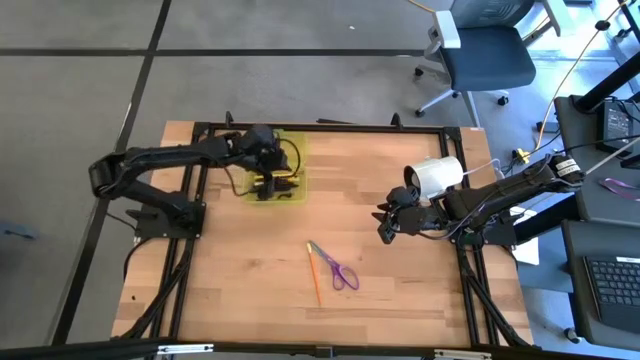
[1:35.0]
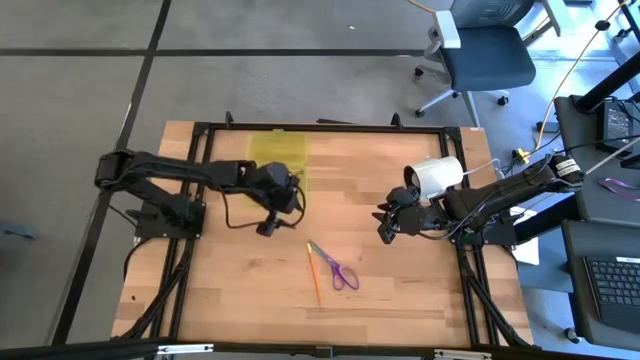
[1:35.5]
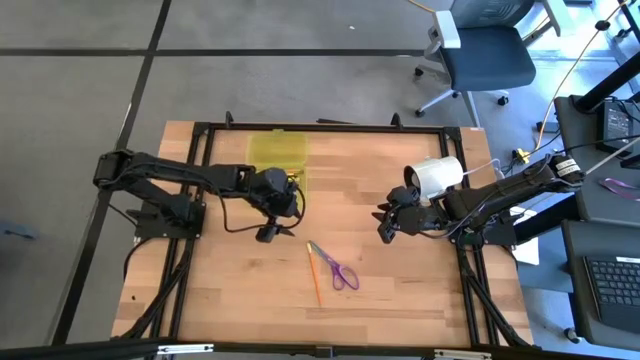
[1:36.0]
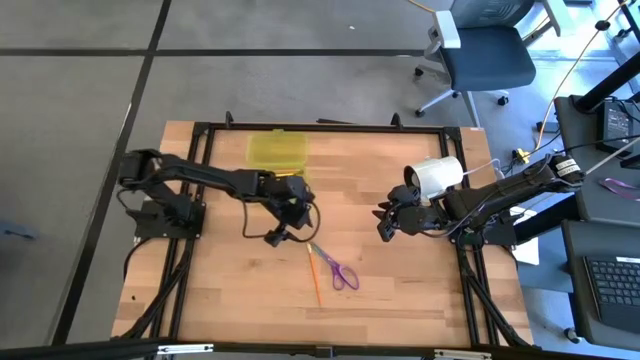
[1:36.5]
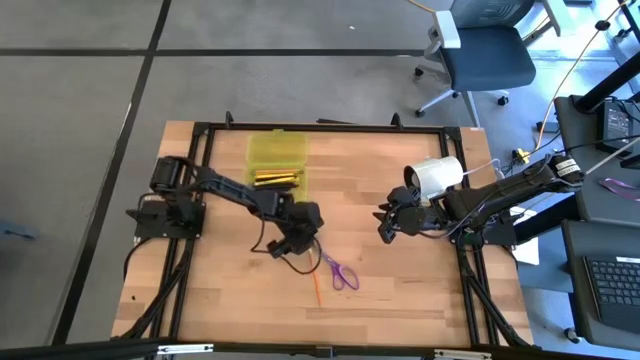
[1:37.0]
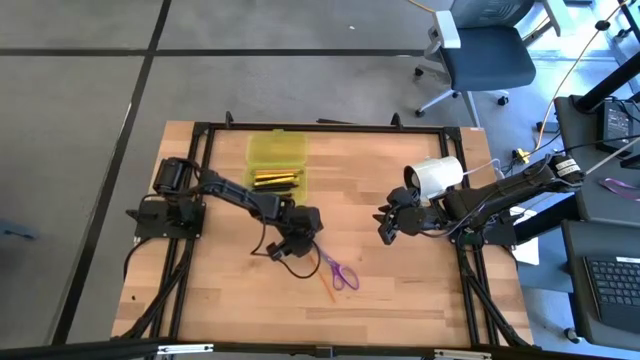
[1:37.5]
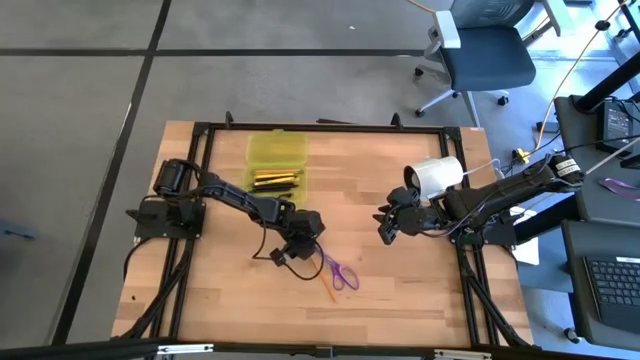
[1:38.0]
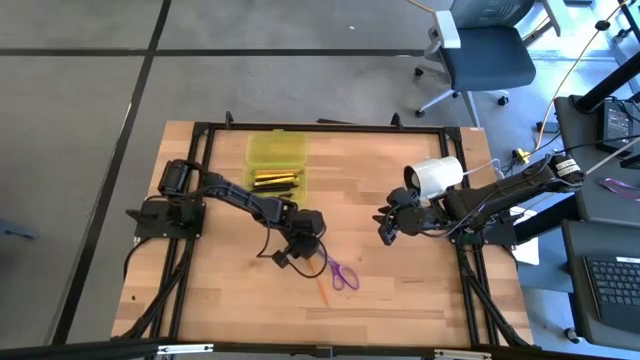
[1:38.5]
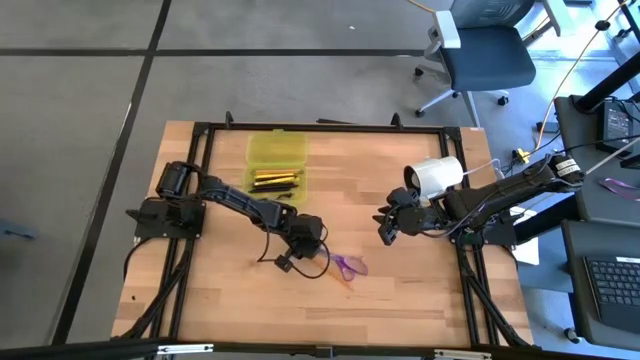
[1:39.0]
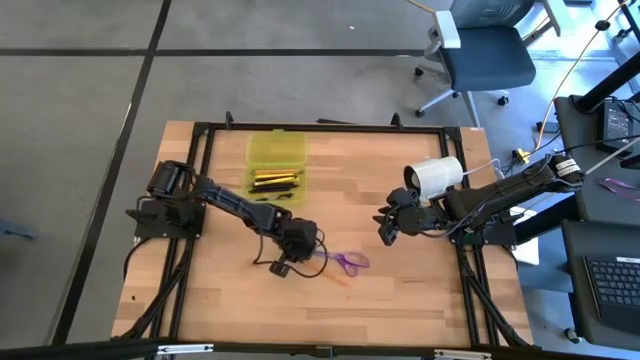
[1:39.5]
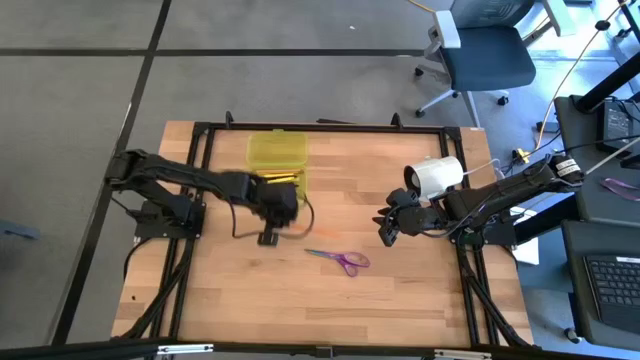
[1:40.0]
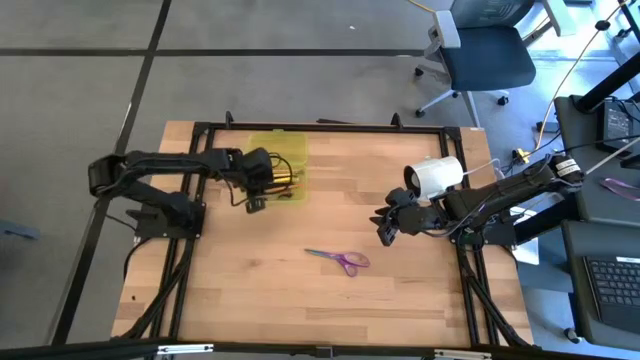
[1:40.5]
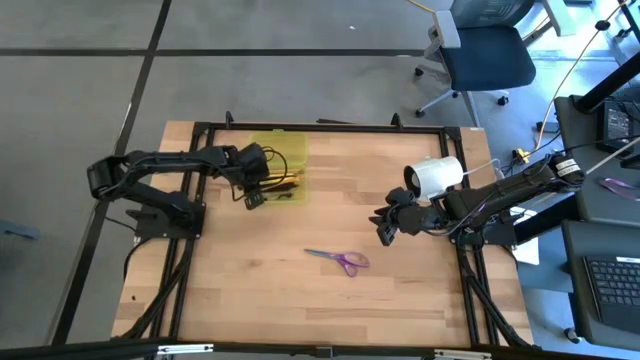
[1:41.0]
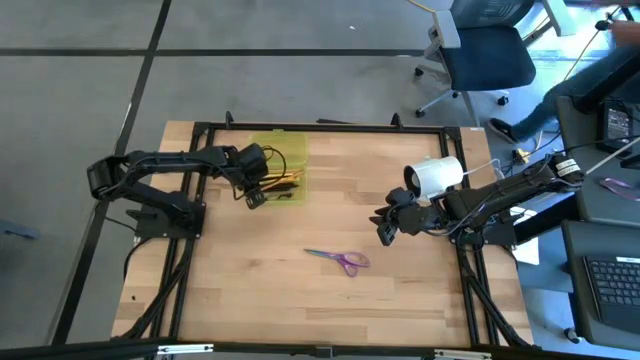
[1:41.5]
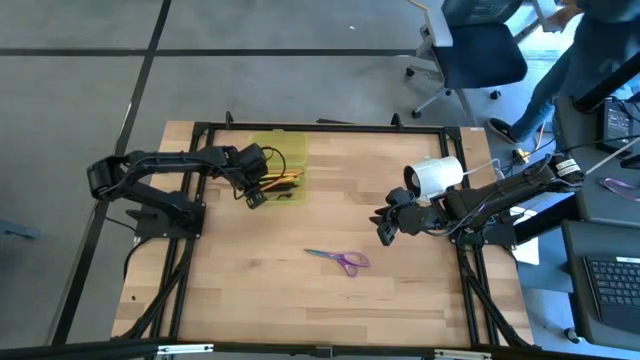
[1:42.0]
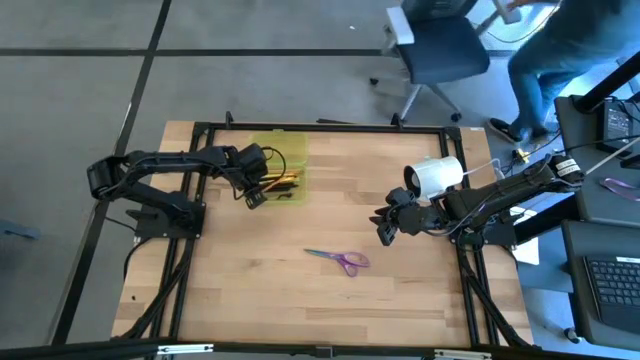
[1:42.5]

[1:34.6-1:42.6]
Task: Pick & place school supplies into a supply box
Put the pencil into the yellow supply box

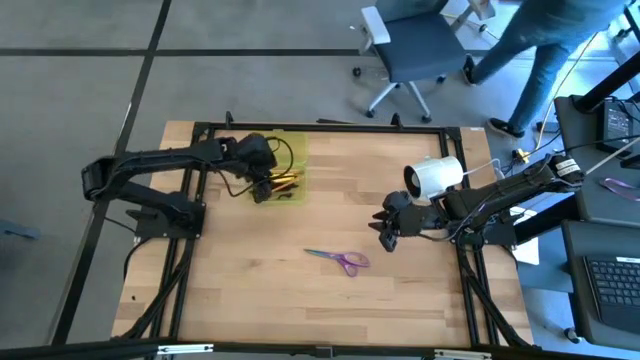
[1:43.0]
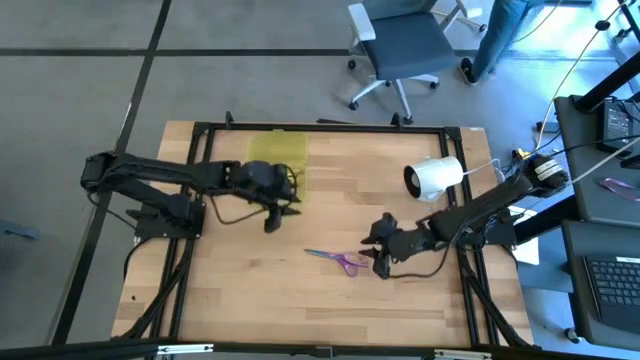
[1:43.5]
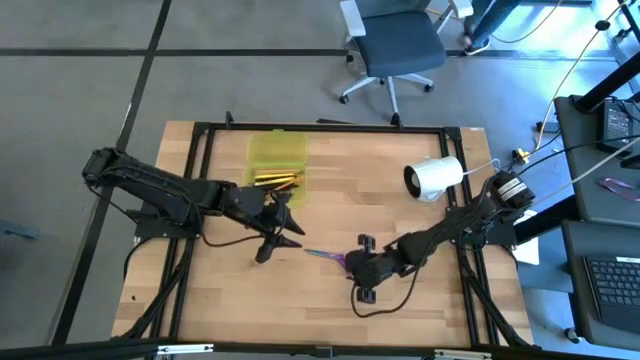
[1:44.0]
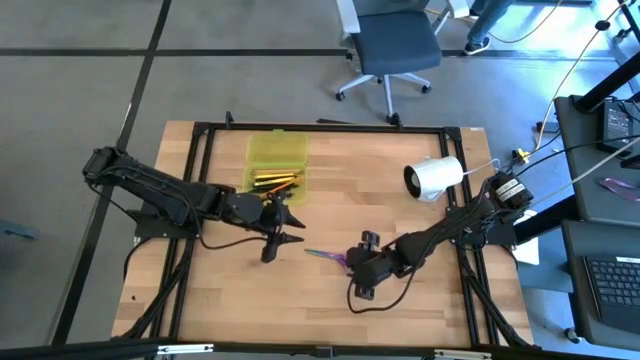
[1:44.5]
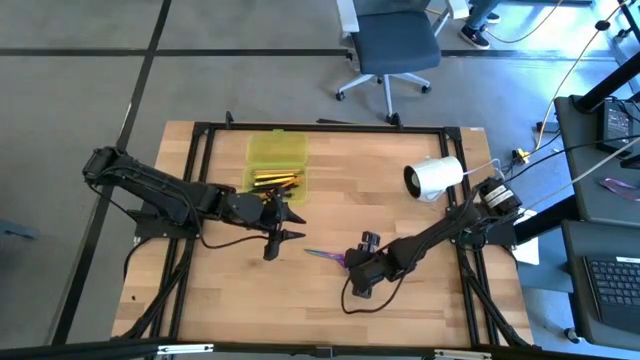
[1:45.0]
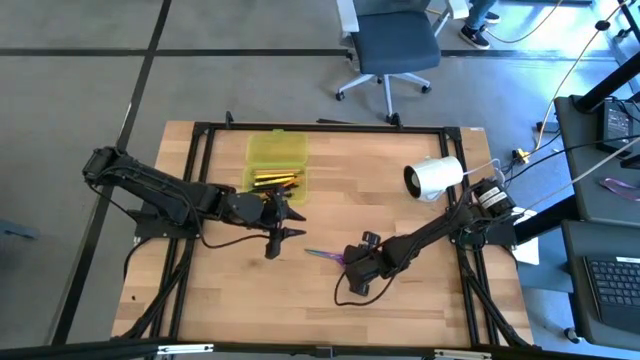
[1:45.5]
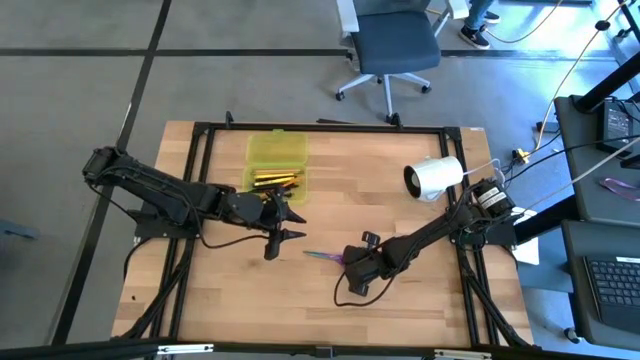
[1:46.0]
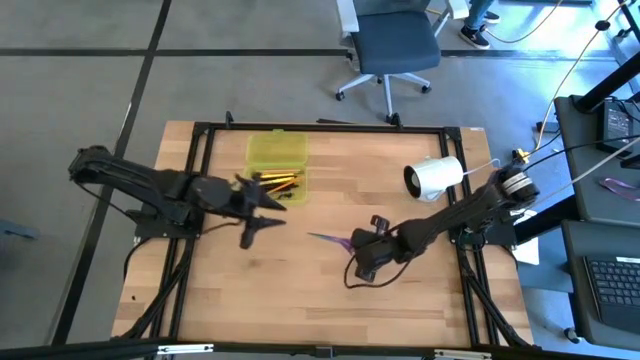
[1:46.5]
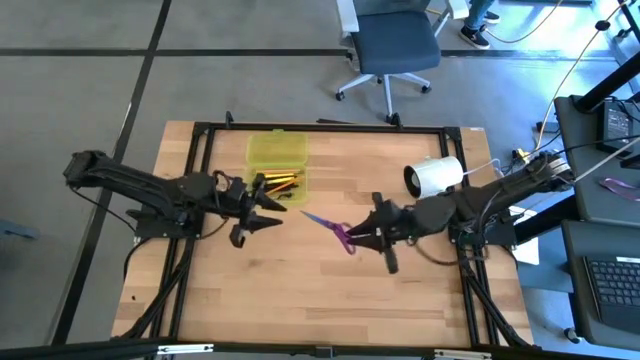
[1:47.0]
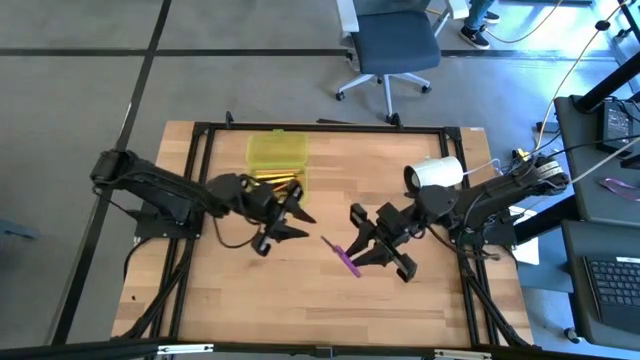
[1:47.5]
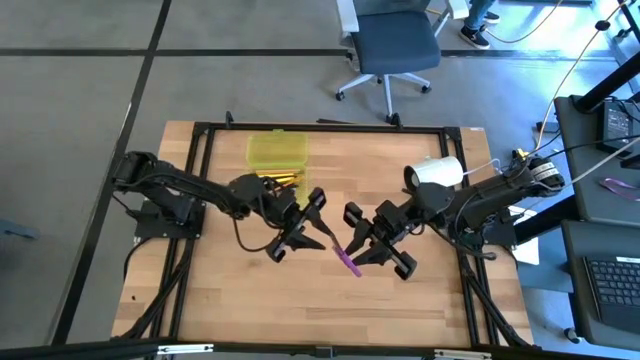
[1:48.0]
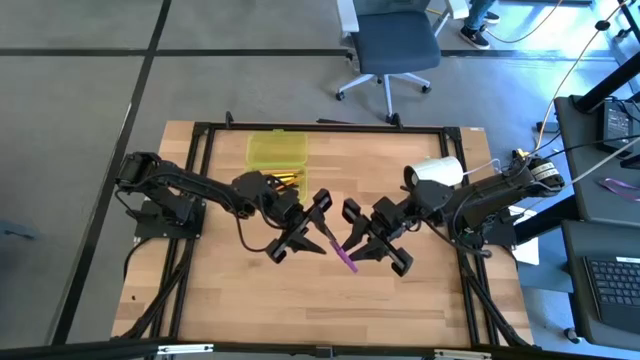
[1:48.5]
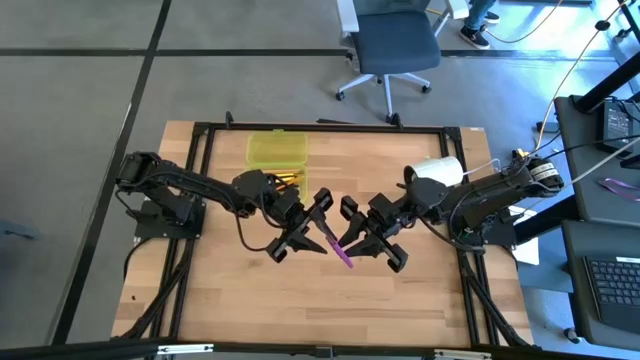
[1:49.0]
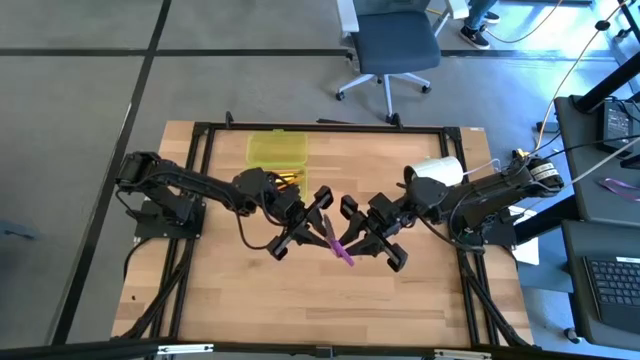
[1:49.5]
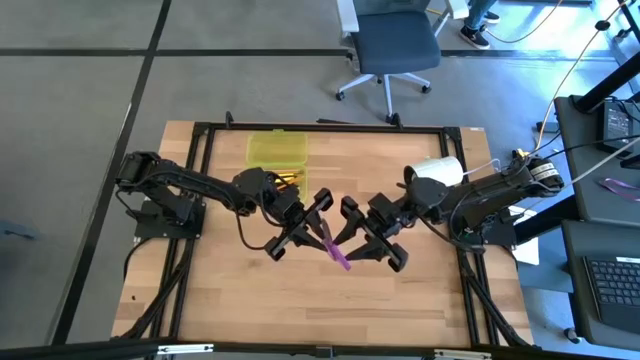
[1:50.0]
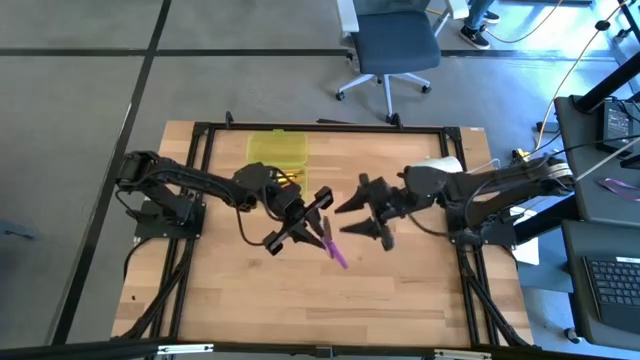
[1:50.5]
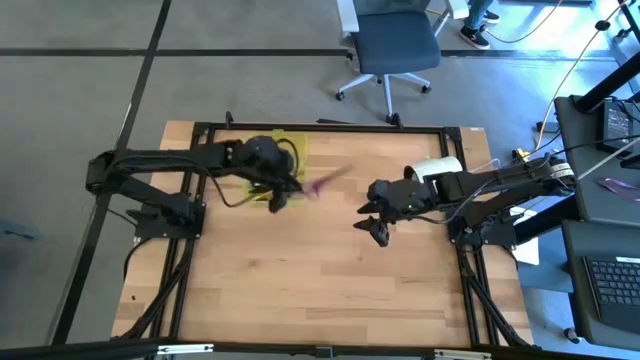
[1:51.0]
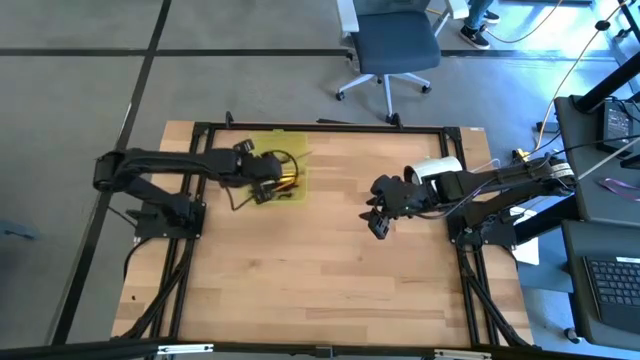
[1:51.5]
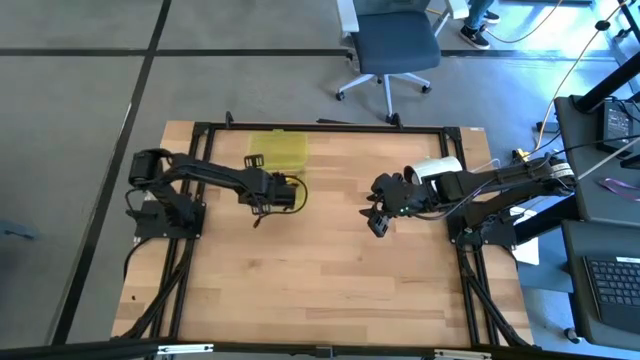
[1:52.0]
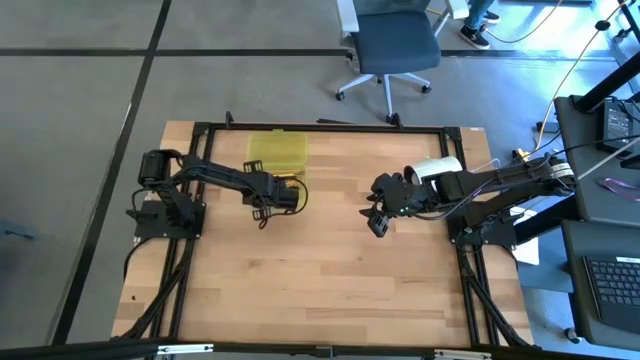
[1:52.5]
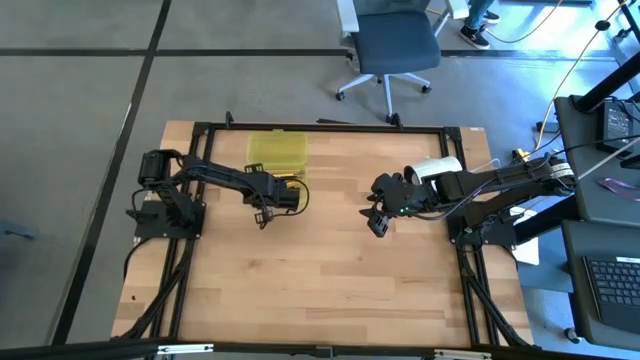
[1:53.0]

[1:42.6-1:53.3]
Put the violet scissors into the yellow supply box

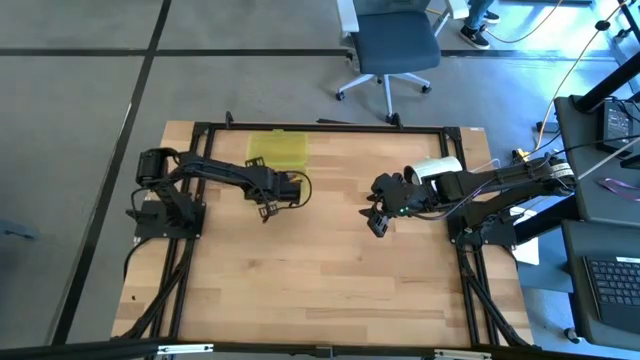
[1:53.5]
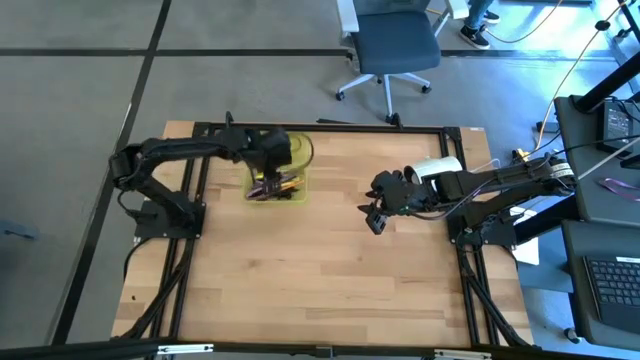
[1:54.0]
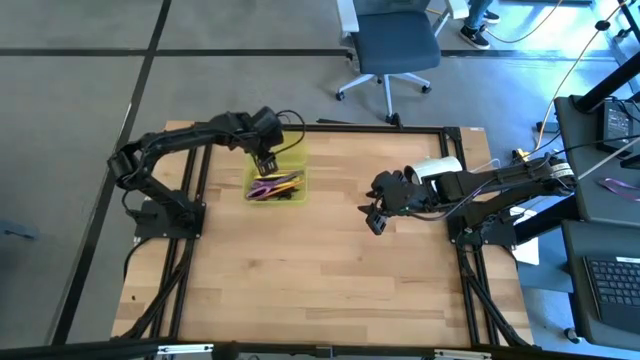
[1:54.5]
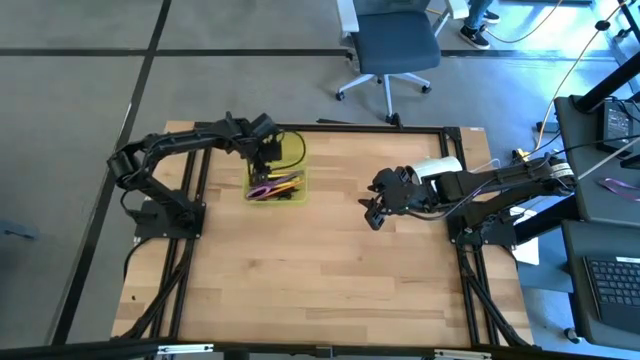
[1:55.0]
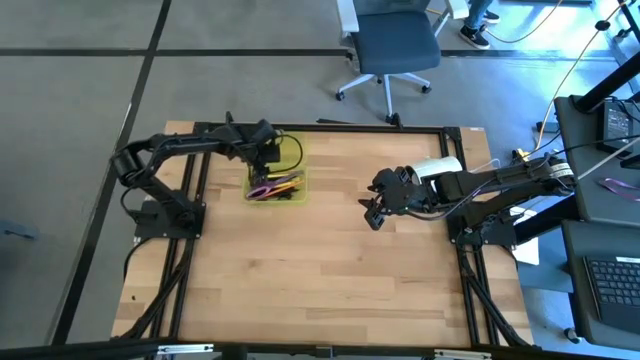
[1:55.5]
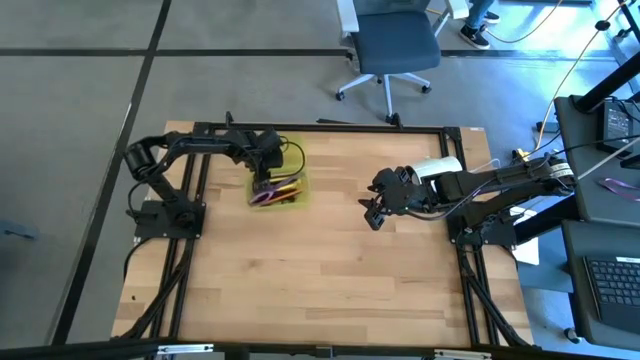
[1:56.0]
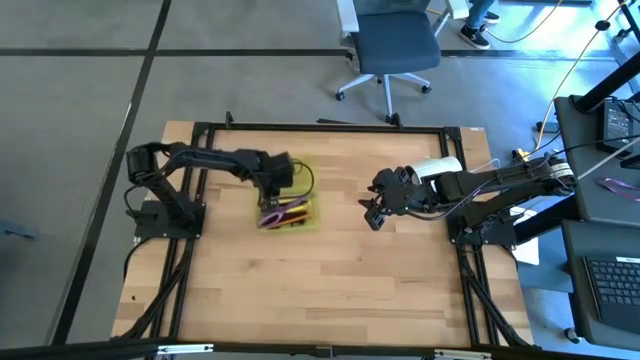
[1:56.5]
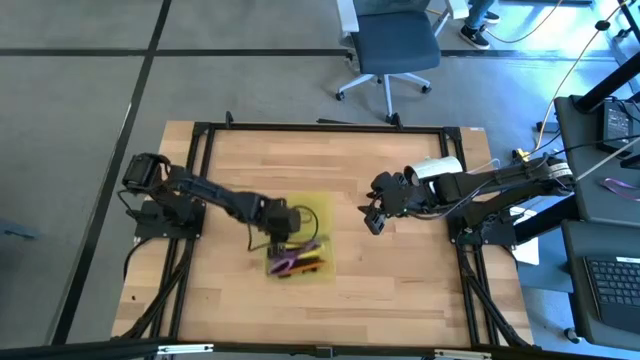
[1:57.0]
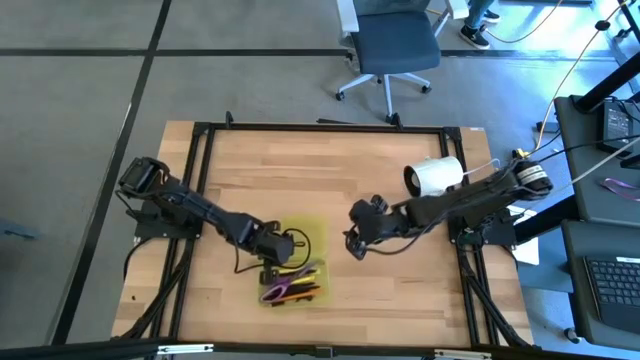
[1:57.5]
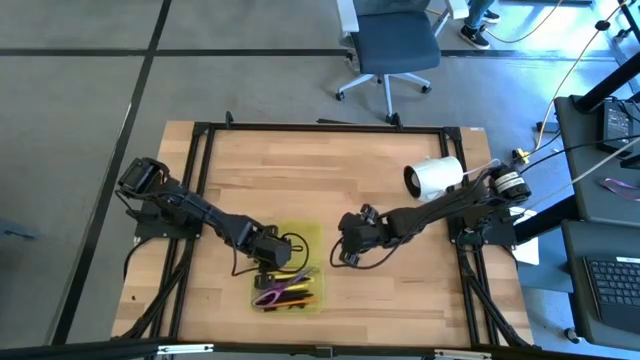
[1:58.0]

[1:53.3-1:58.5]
Move the yellow supply box to the bottom of the table
